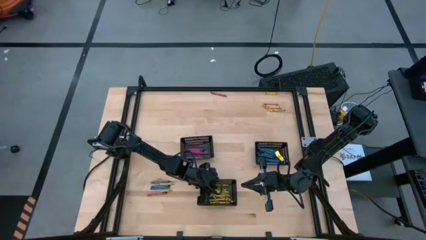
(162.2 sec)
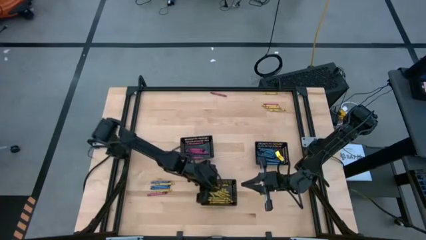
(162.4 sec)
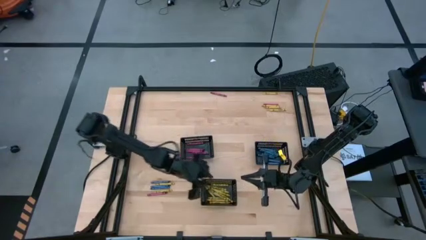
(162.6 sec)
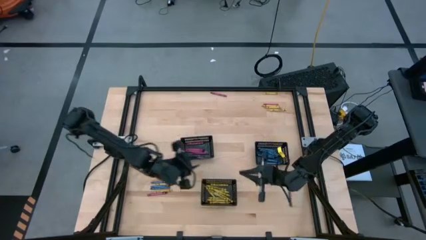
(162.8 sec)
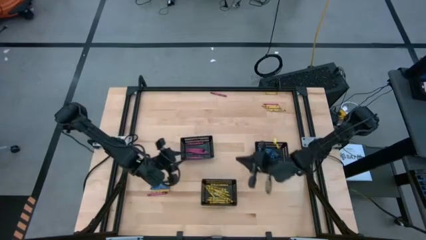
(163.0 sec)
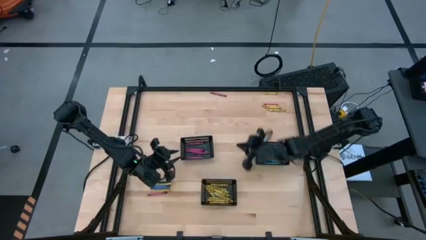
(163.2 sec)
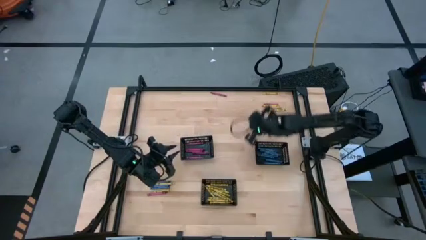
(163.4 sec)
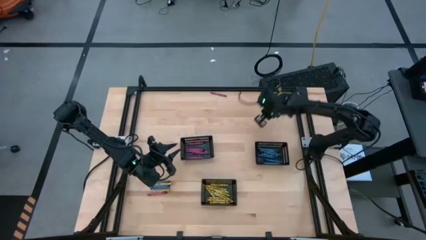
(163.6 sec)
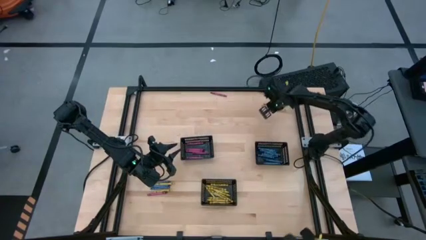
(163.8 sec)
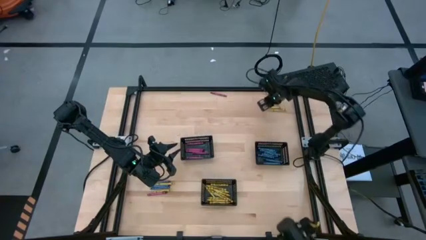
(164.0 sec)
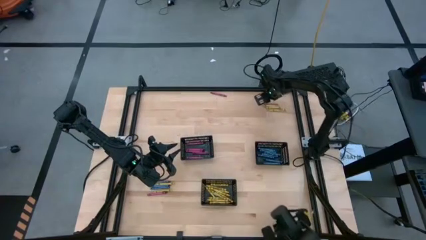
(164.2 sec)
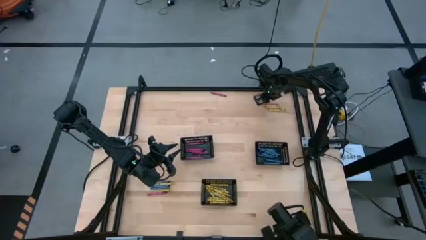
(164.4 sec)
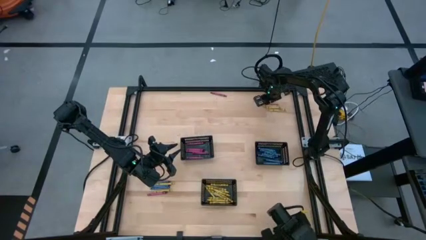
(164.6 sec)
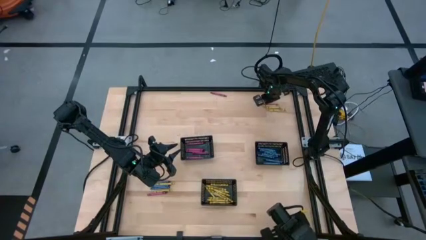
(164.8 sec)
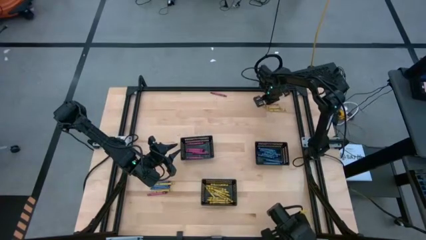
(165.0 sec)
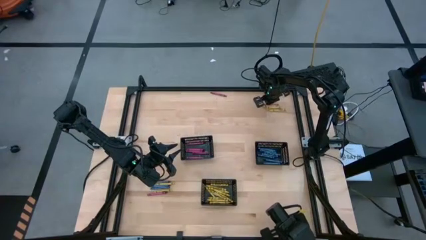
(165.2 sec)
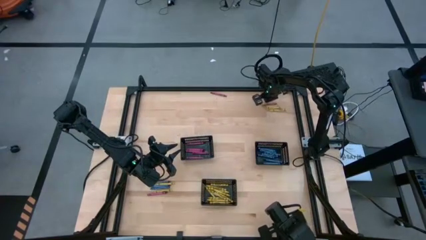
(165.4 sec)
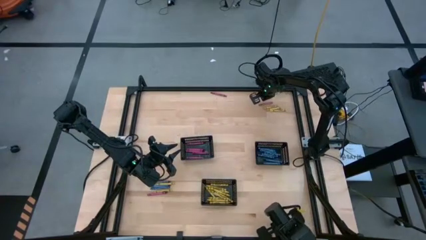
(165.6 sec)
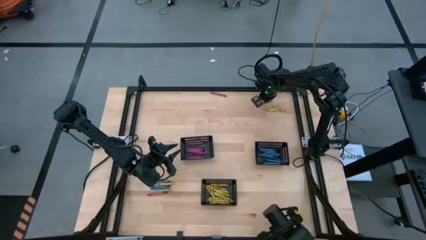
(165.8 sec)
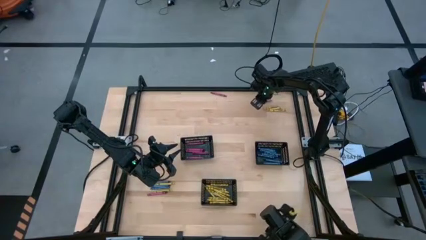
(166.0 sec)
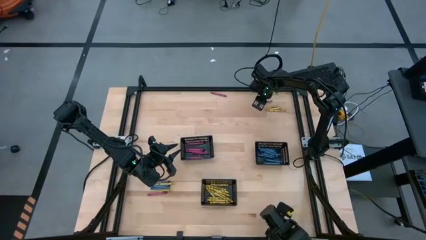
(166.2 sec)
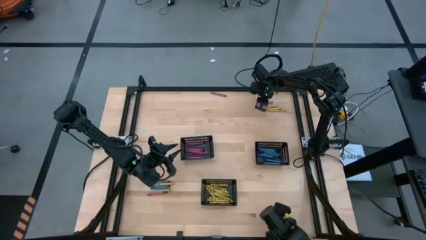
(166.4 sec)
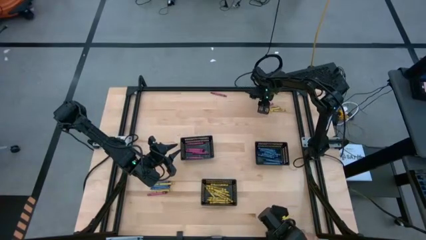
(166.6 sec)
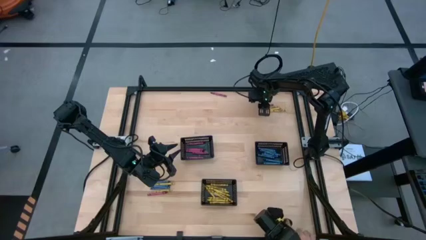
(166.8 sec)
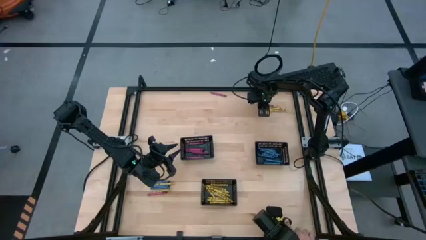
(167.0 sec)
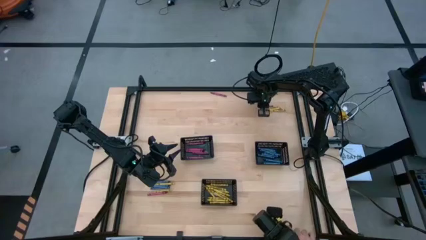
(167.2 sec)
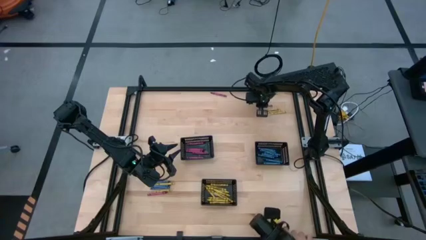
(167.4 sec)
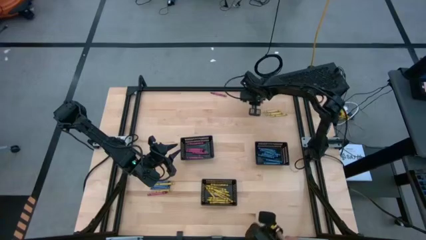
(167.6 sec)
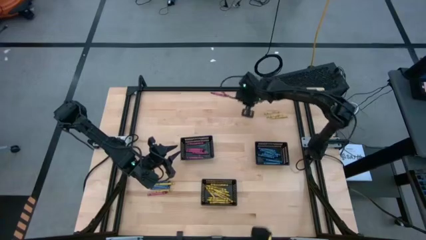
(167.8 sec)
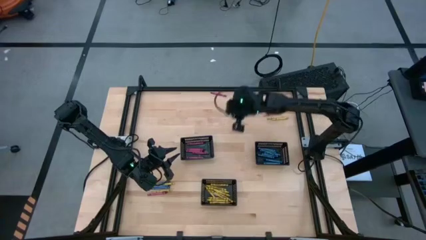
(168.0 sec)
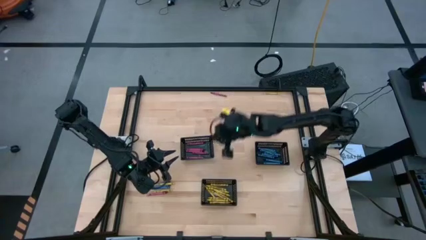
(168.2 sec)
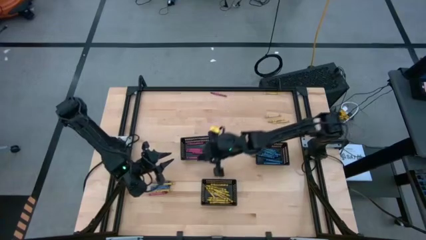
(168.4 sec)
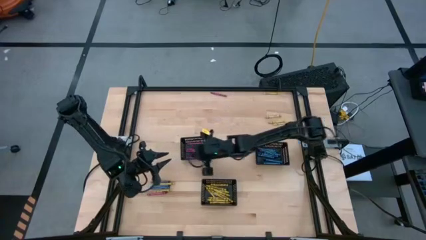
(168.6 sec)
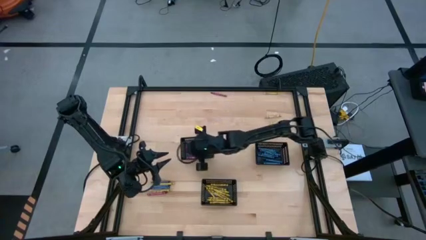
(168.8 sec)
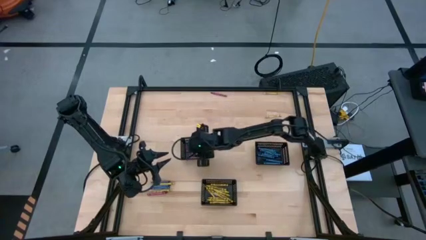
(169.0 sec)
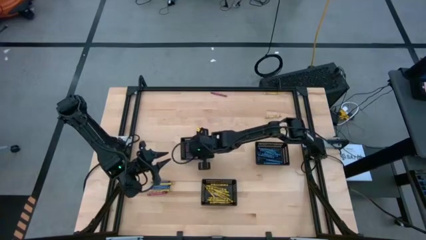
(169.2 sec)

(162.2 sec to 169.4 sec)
Task: Sort crayons
Put the red crayon into the left black bin

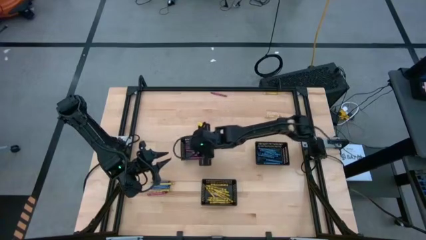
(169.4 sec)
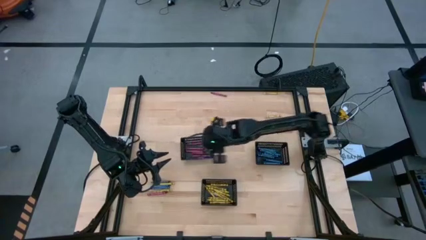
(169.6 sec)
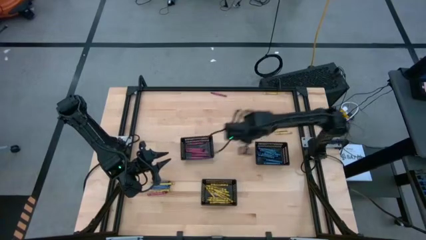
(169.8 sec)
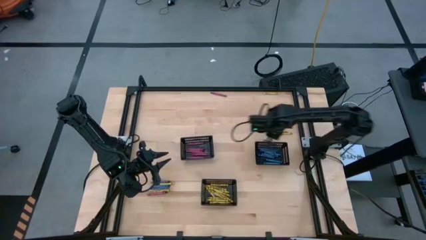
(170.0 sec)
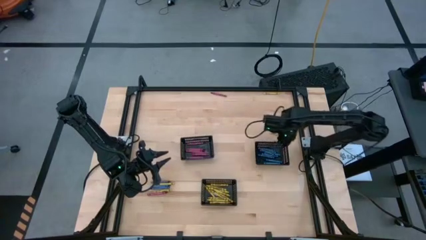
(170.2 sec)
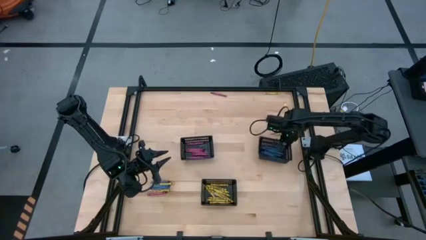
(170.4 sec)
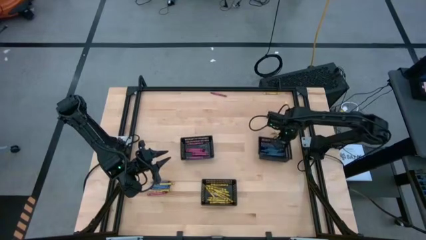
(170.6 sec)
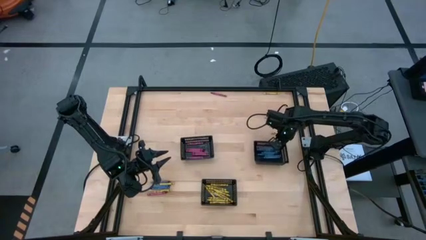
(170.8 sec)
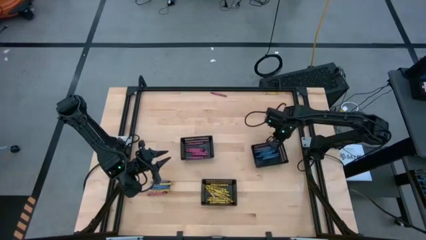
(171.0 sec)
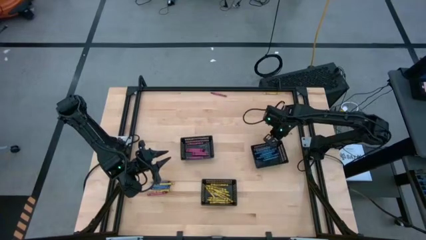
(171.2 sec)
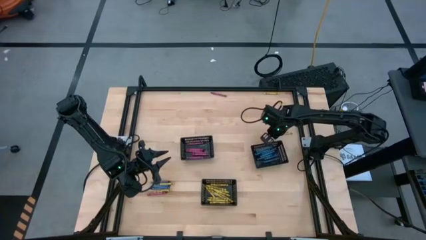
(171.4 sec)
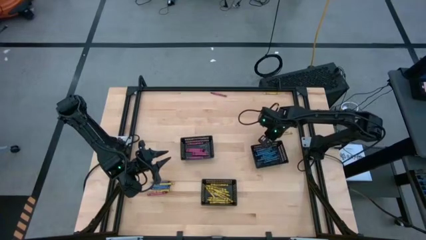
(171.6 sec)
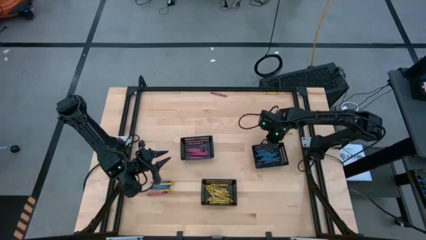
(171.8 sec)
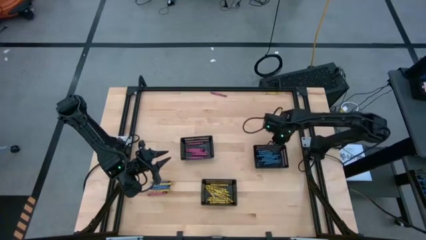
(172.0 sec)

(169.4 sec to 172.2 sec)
Adjust the right black bin

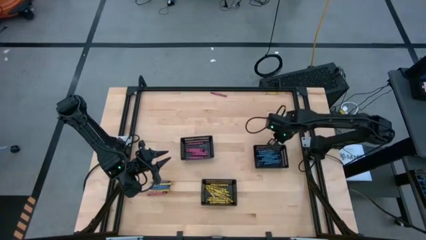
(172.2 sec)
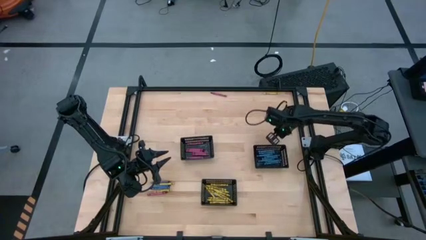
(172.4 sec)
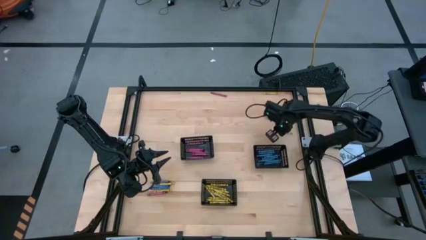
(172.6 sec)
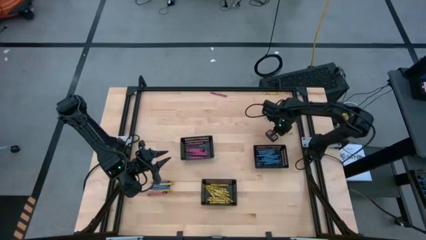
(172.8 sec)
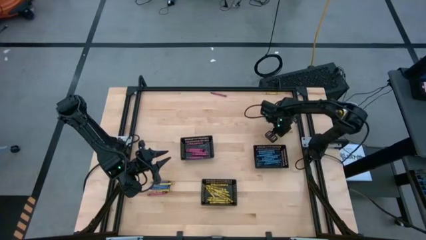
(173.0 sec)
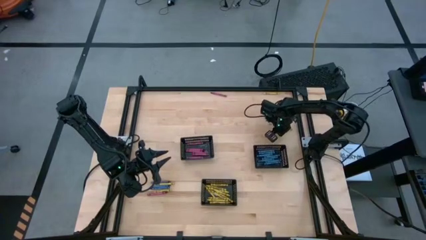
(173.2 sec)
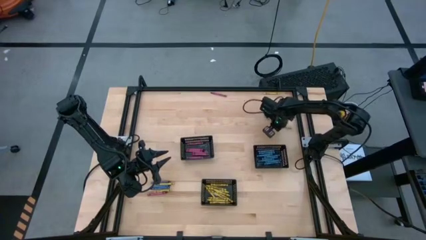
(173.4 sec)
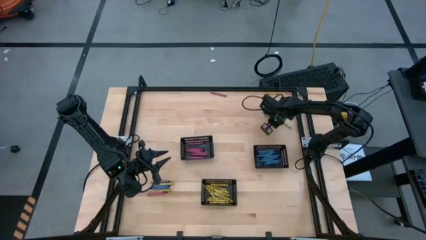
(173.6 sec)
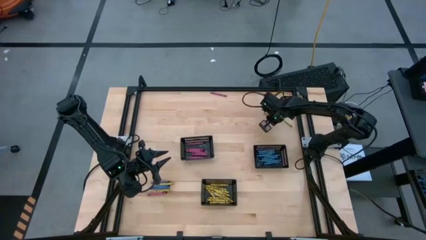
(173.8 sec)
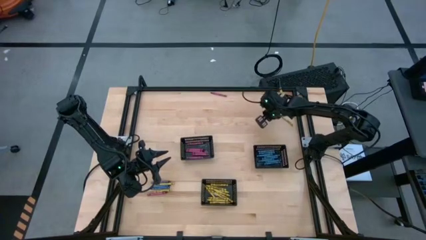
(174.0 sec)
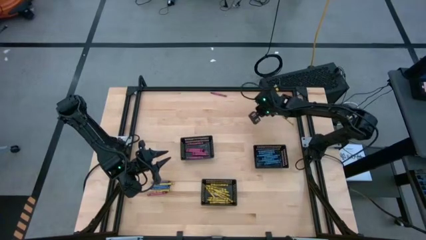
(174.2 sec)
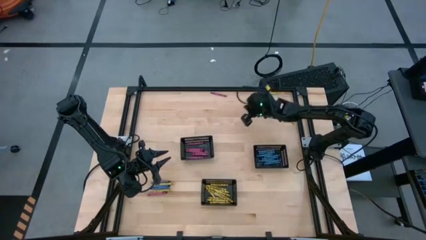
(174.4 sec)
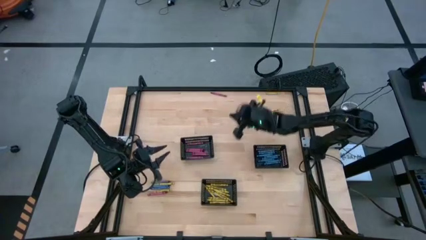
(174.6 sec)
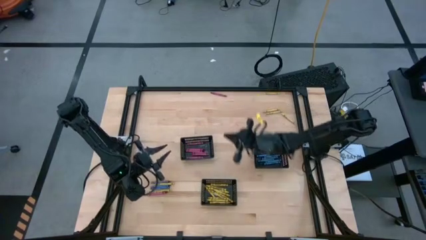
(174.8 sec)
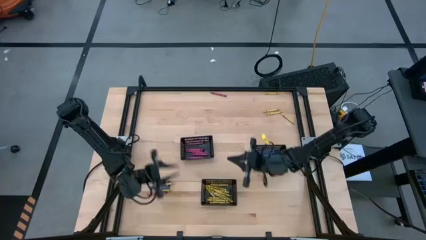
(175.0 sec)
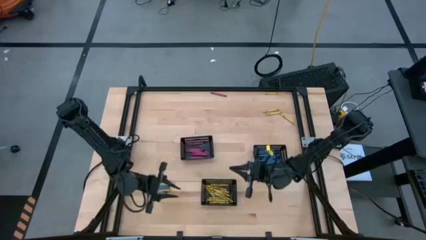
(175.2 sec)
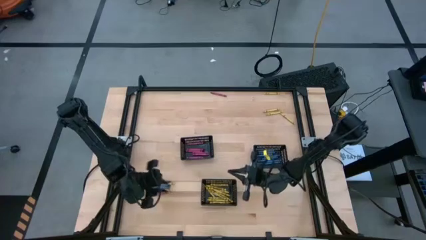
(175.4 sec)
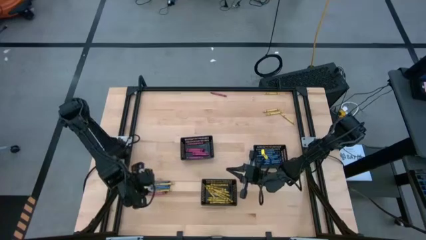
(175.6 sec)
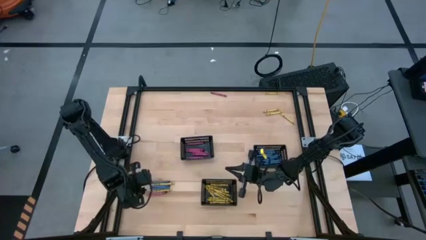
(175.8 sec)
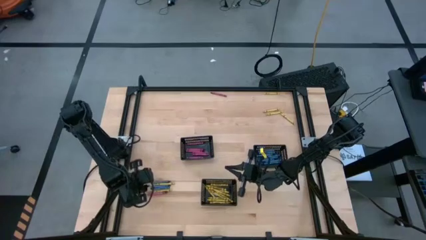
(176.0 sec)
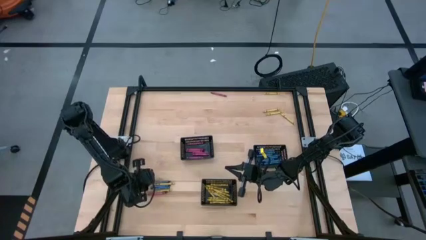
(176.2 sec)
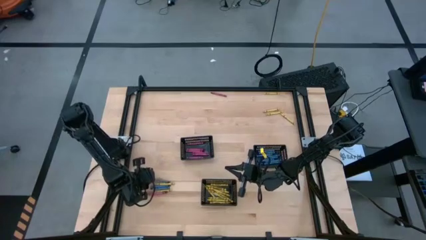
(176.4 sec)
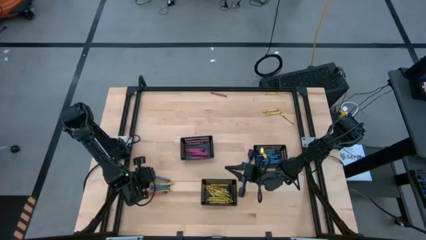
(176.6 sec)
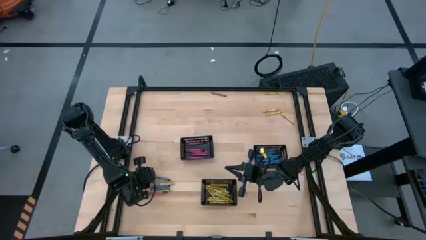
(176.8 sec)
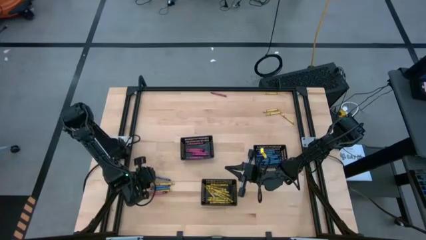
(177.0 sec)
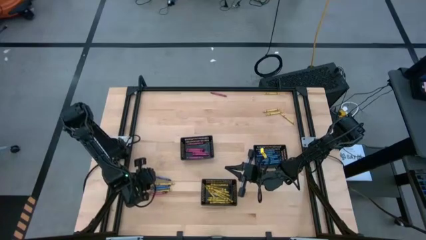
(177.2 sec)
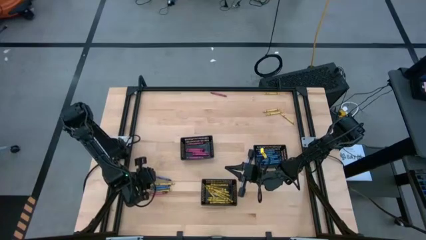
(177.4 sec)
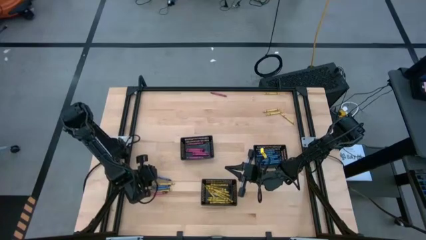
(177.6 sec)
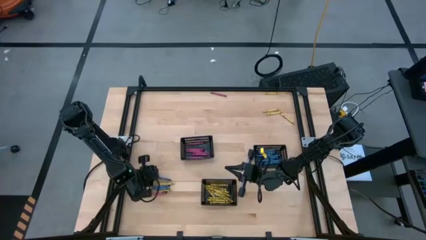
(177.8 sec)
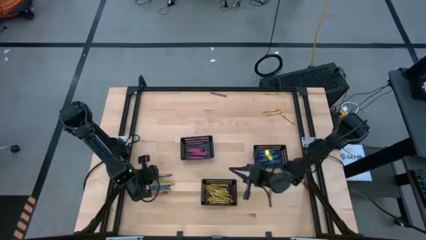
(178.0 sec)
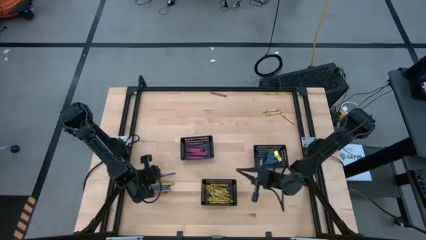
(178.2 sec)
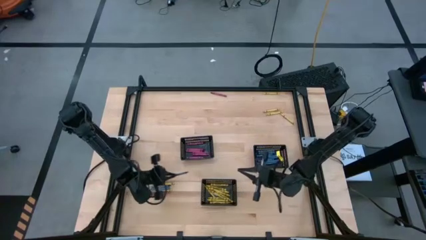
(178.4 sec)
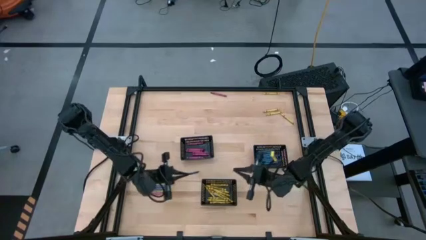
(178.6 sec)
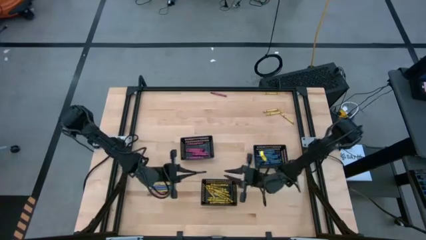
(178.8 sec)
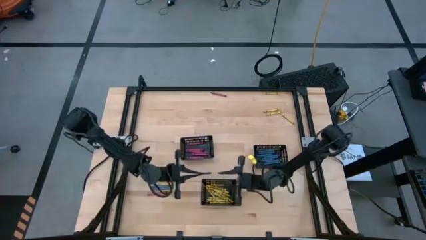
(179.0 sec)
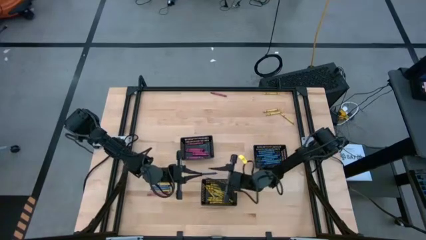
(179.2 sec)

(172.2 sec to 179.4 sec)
Put the blue crayon into the right black bin
